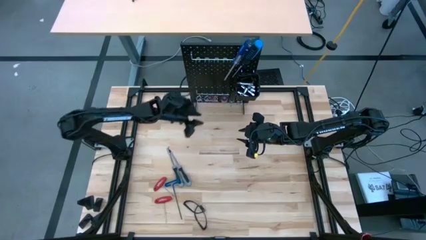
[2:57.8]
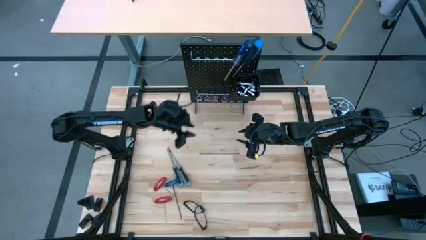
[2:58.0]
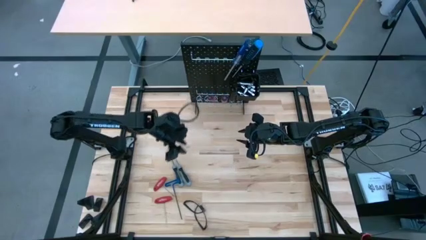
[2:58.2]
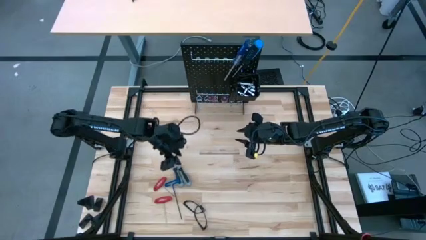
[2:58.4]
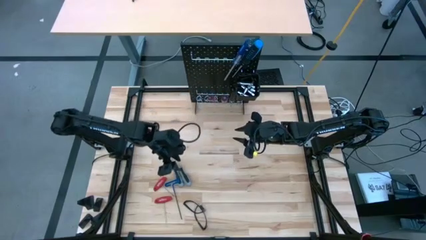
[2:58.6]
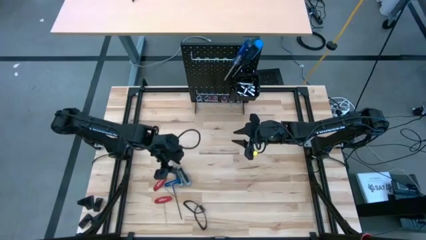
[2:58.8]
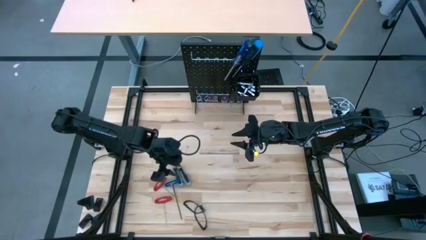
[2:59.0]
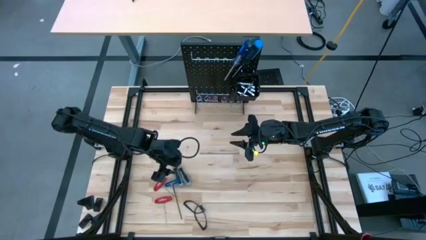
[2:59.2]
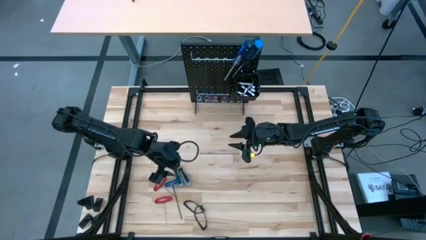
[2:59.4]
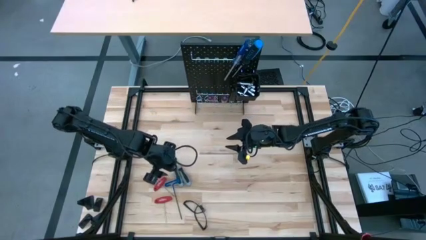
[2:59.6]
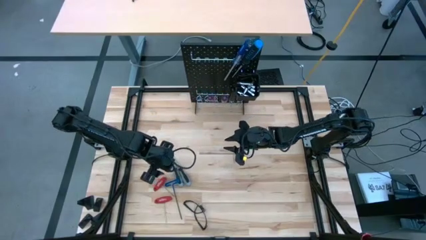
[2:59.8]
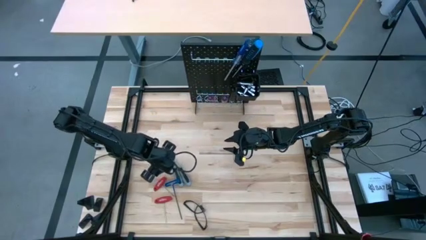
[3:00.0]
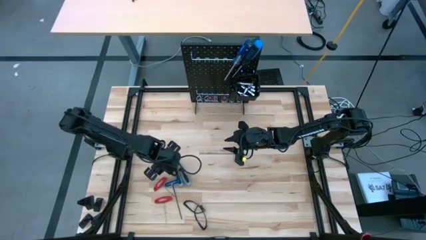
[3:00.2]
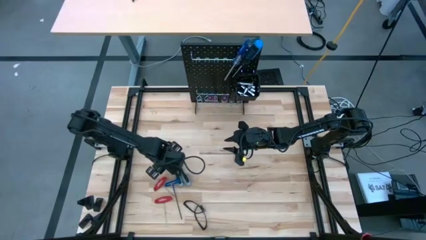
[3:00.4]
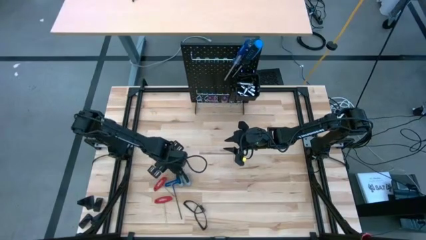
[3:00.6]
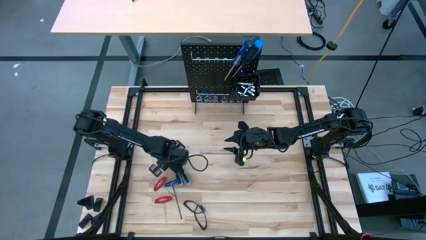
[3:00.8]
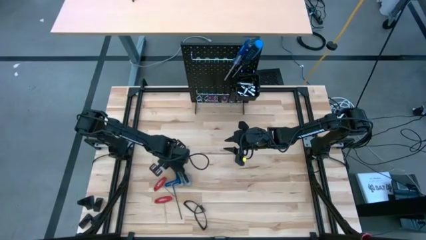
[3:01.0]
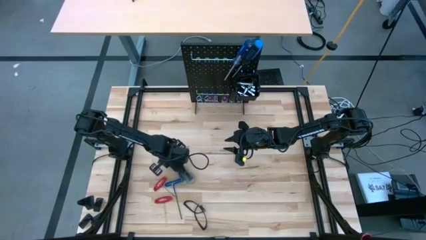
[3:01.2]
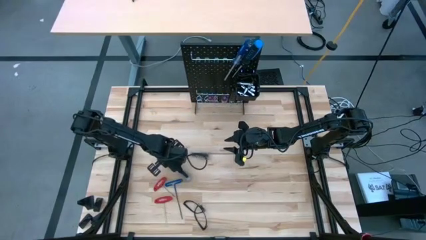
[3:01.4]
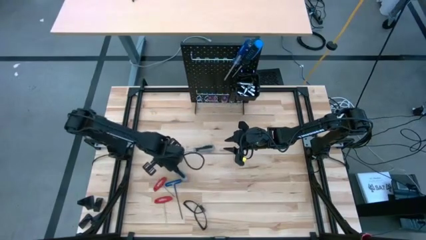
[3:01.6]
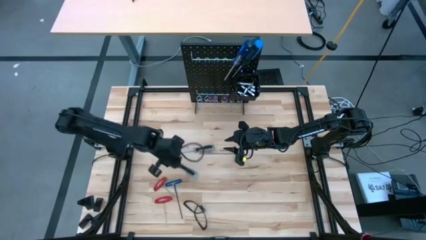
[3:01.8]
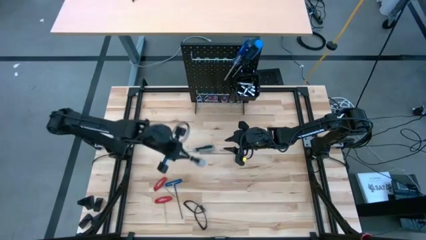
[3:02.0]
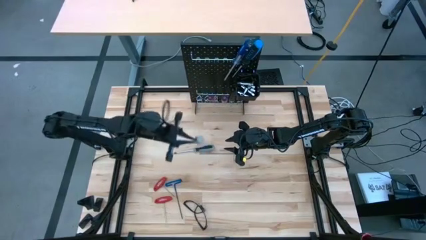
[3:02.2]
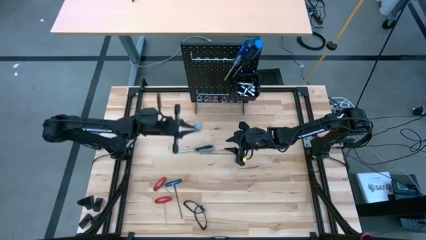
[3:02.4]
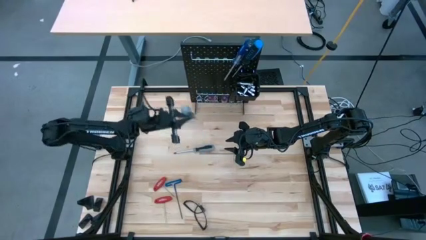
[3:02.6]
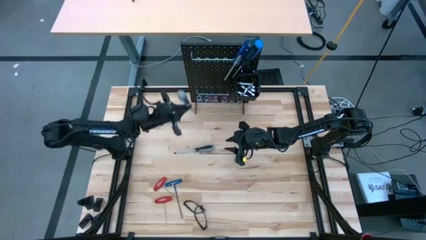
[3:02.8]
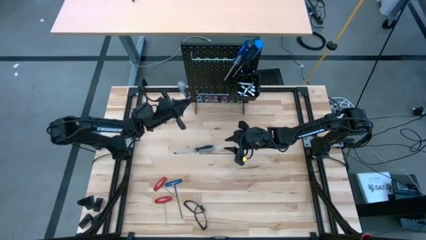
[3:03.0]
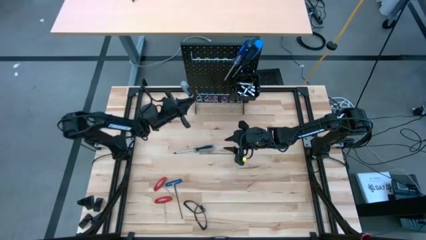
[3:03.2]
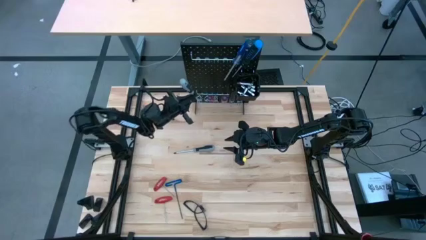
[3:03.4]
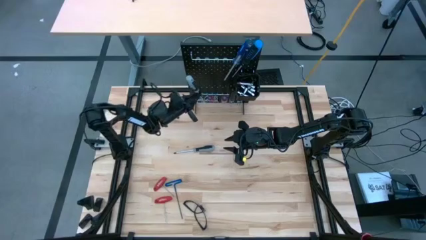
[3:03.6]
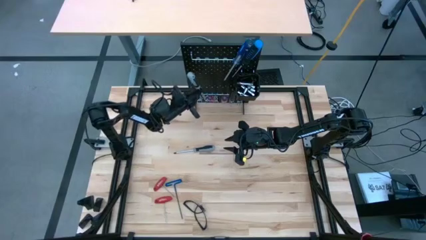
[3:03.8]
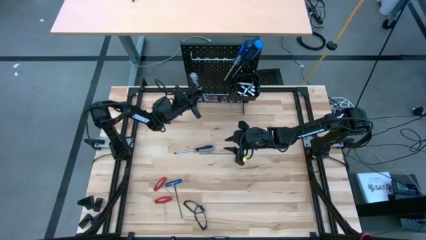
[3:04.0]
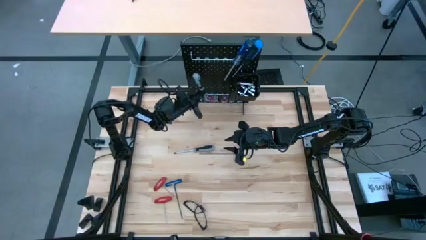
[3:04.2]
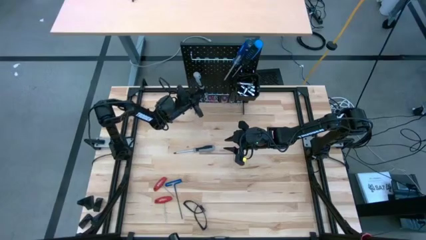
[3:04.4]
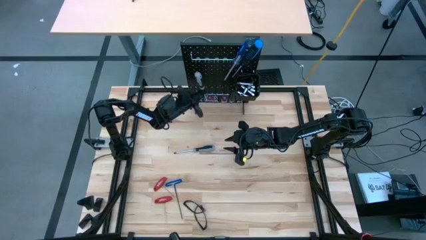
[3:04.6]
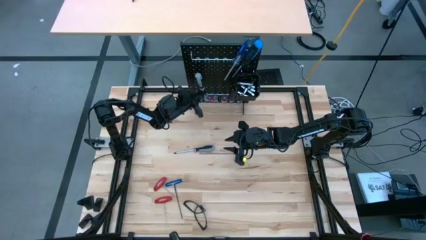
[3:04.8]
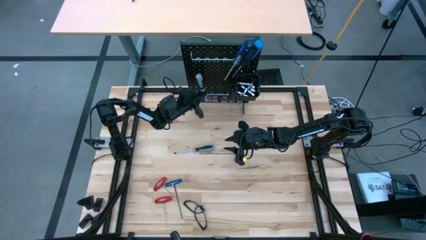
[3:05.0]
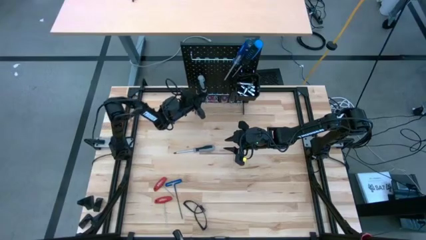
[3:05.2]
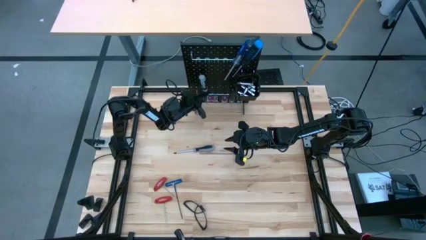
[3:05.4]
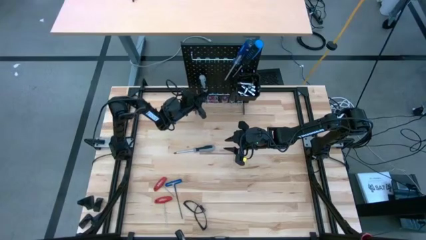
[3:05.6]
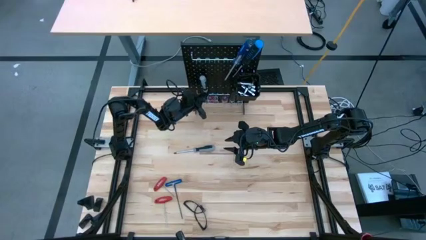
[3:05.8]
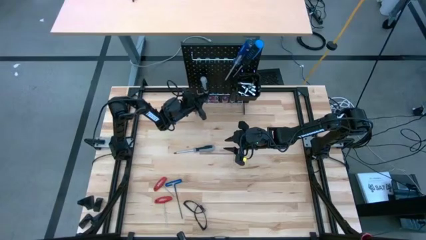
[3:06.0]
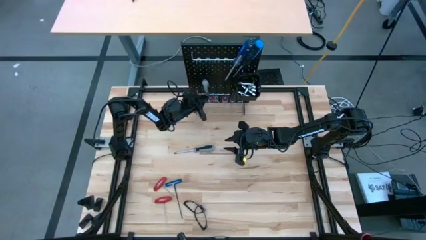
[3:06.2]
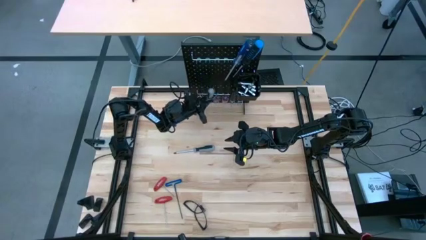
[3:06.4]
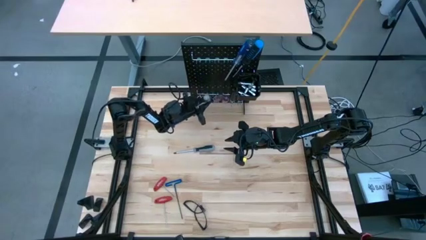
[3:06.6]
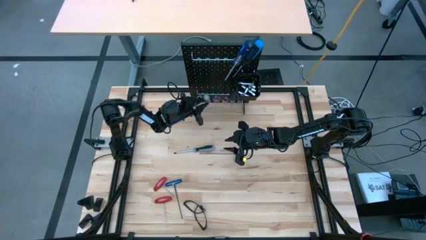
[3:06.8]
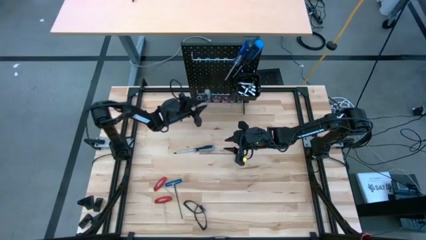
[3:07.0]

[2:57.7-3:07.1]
Task: Hang tools onto peg board
Hang the gray screwdriver on the pegboard

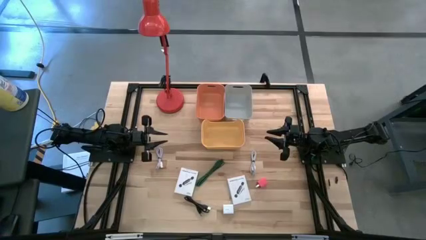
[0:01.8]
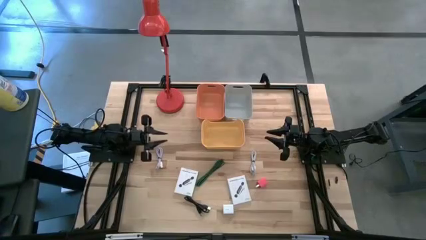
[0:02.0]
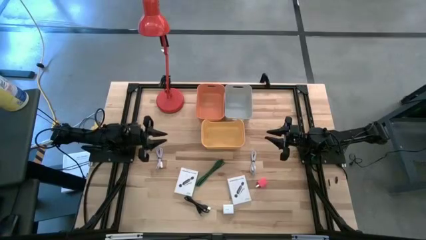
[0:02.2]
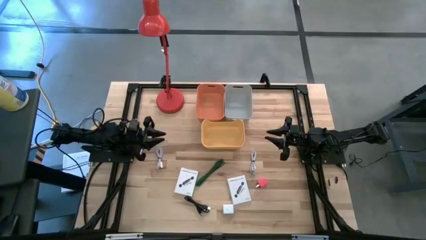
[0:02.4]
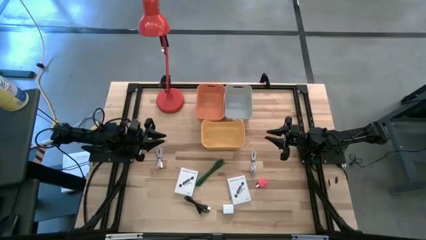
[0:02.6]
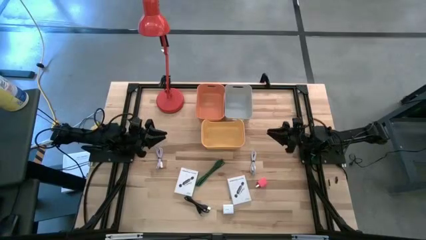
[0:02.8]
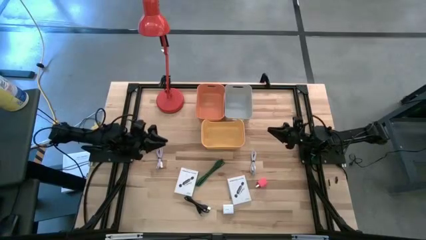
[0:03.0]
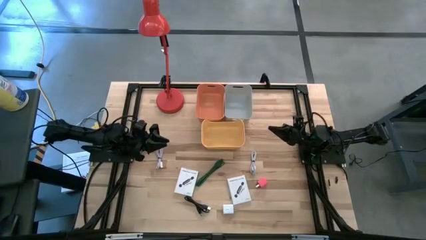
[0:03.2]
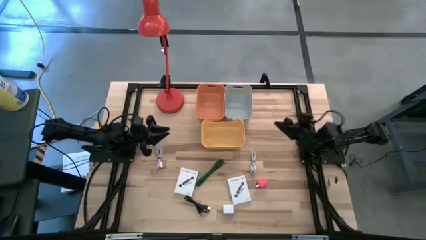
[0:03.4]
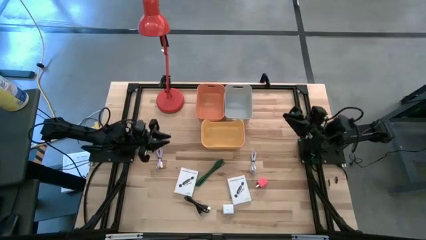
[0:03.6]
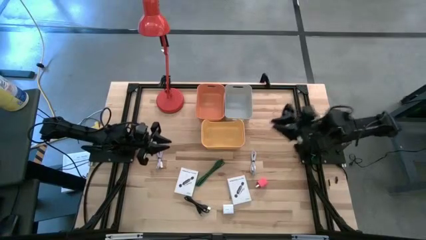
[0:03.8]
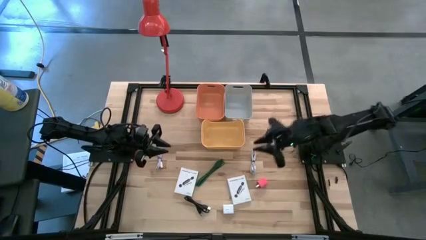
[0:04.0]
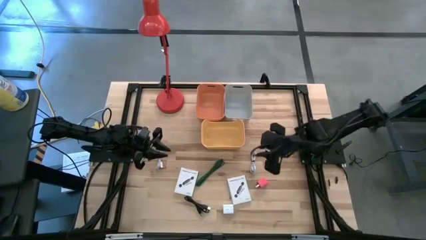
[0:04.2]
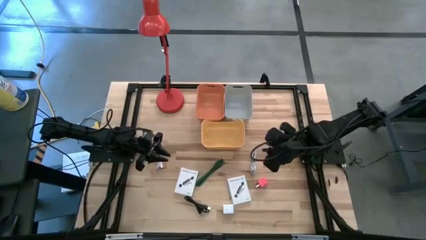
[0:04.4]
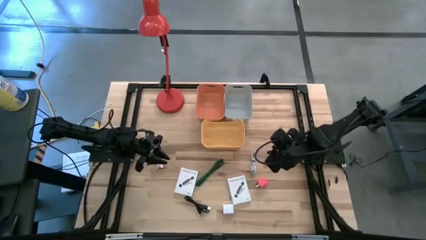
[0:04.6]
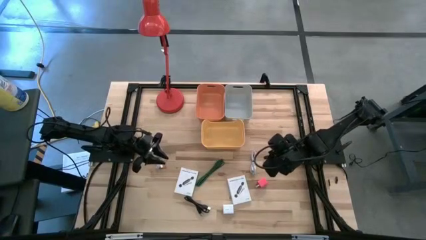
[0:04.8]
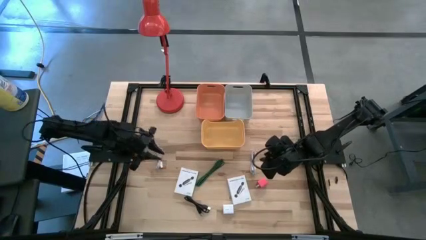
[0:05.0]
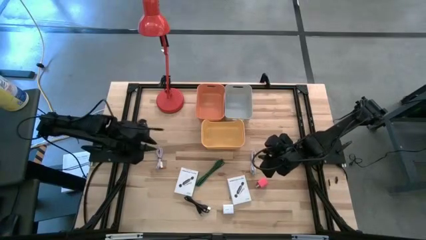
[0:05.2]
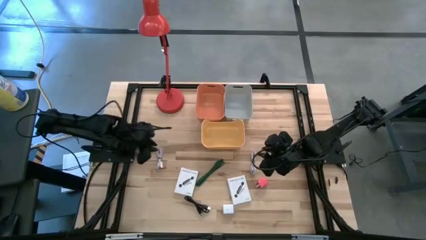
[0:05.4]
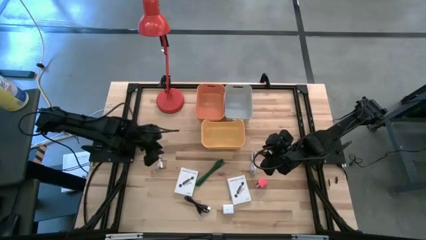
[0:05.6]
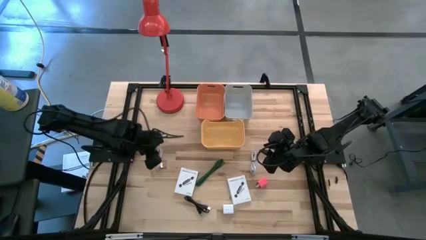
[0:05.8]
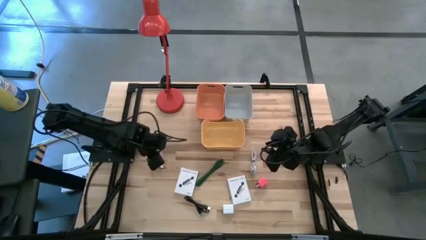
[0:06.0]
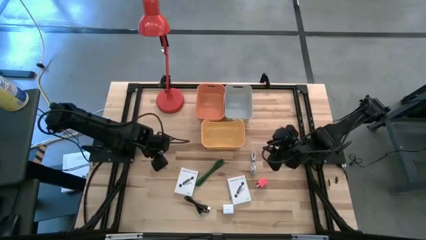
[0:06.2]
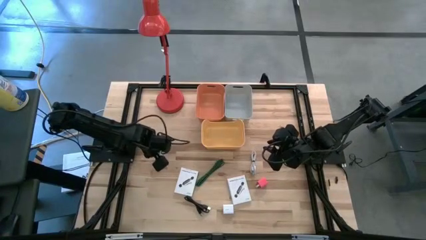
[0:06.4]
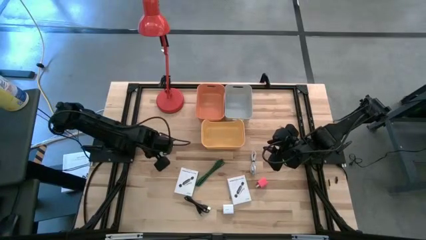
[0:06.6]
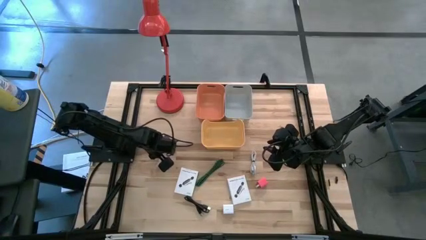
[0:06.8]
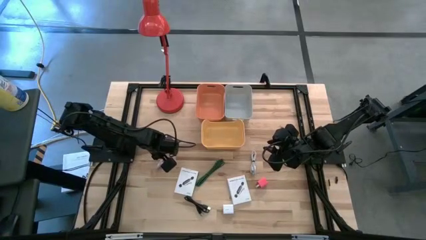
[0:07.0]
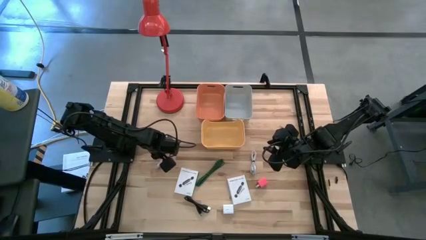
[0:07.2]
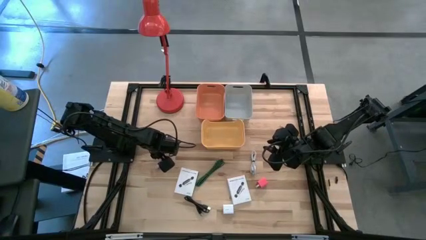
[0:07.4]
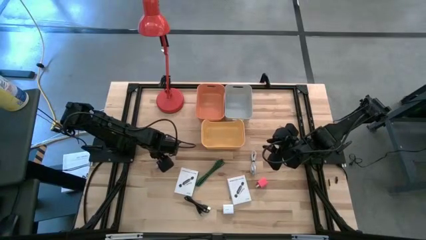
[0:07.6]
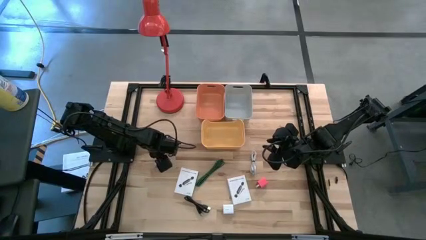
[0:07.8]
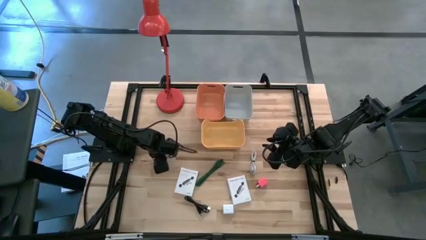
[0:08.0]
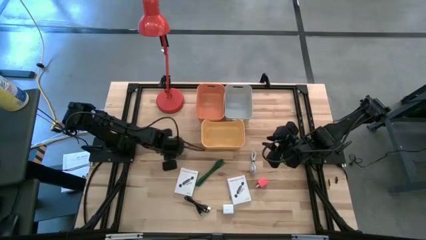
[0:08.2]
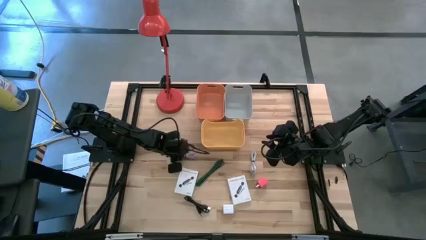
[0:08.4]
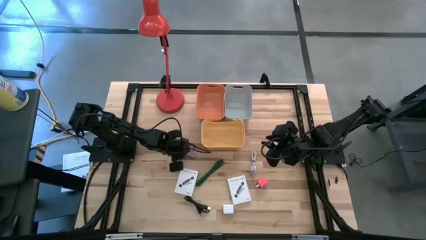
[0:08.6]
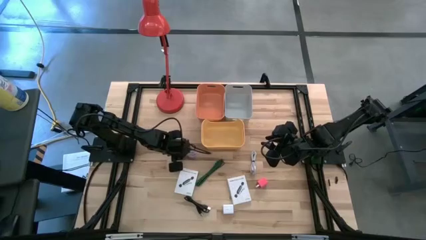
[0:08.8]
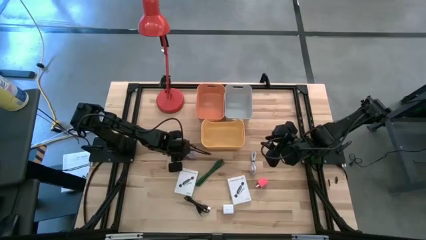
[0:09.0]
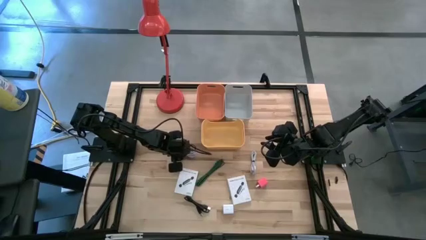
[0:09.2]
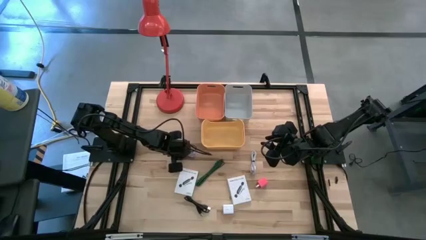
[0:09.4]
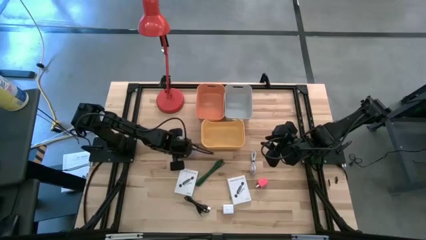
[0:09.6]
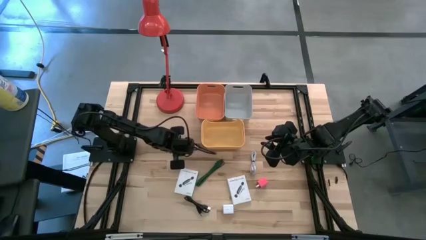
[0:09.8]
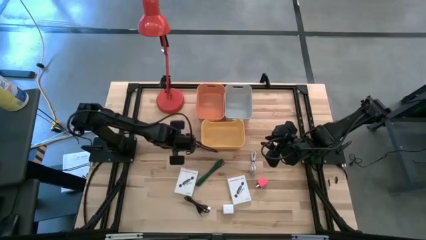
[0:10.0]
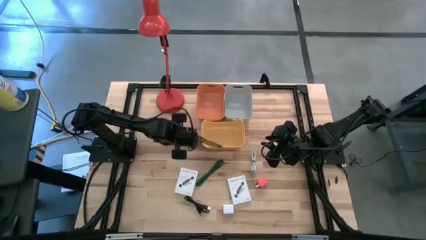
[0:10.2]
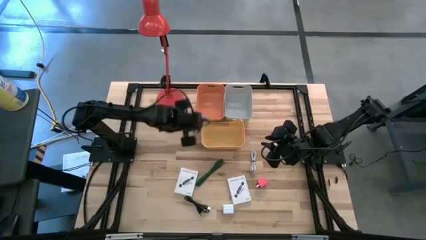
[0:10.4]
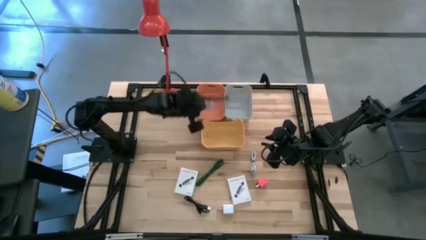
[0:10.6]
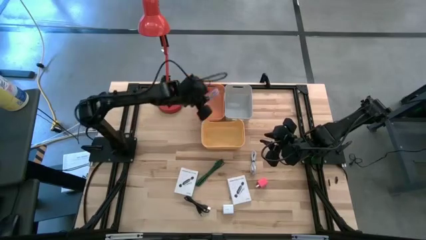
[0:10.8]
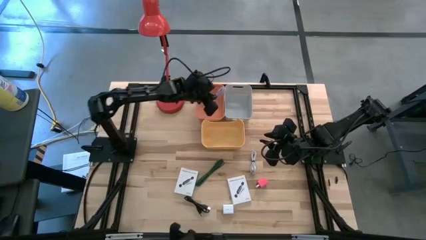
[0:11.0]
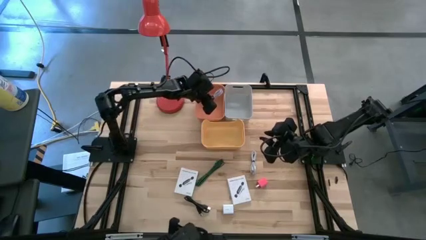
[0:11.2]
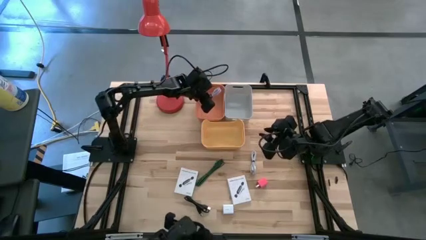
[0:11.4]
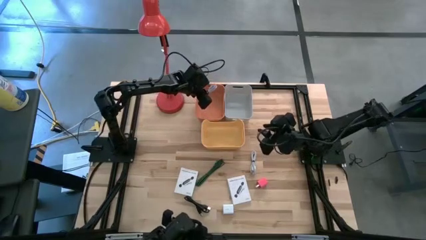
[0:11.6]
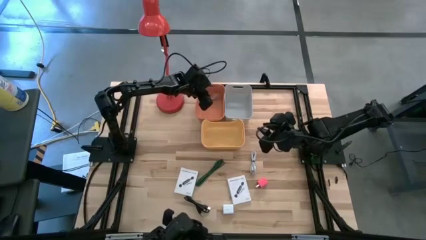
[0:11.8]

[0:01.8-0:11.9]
Task: Pick and place items into bin
Put the left white charger cable into the orange bin
